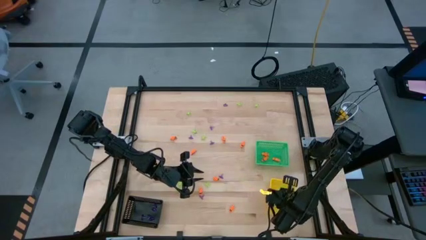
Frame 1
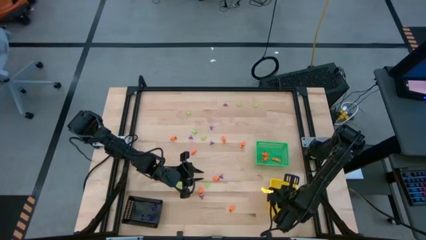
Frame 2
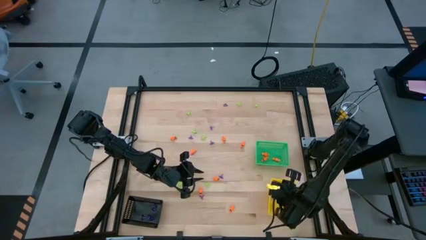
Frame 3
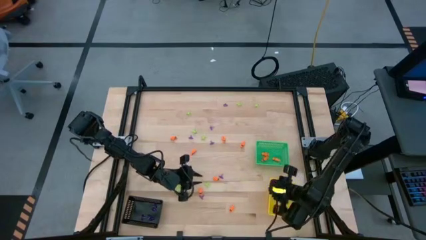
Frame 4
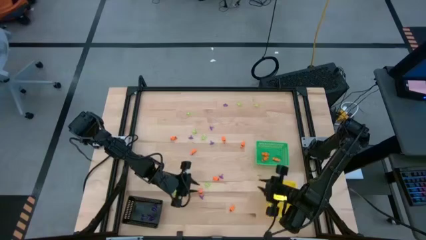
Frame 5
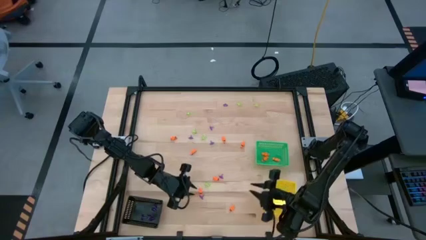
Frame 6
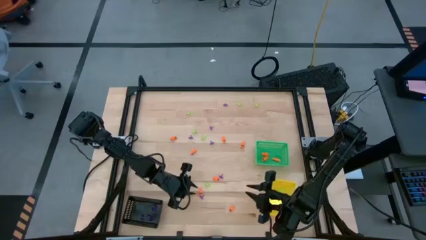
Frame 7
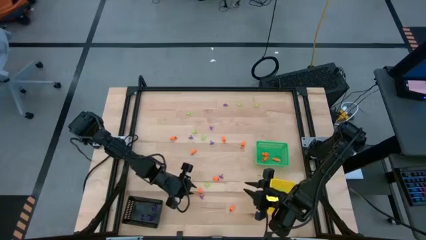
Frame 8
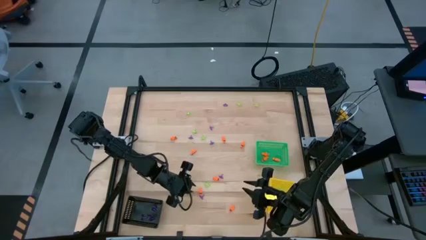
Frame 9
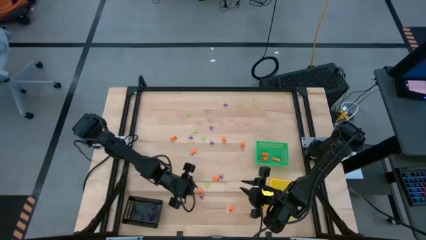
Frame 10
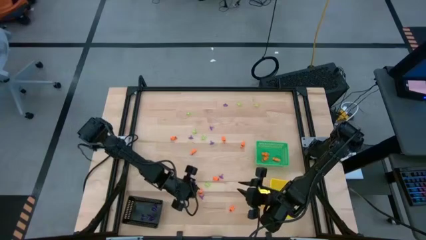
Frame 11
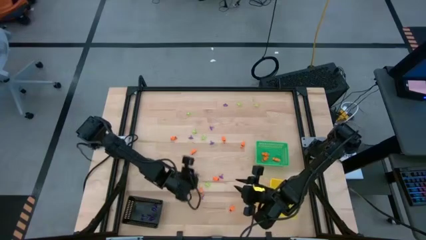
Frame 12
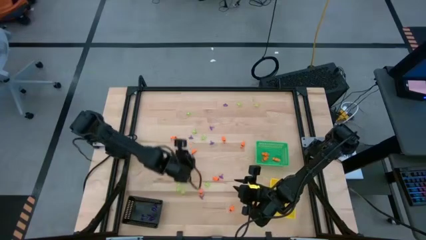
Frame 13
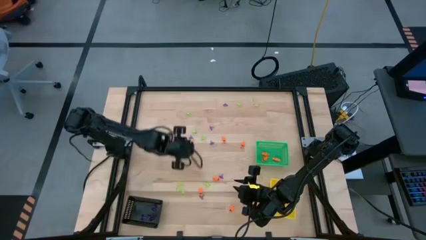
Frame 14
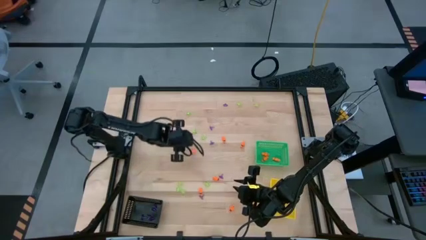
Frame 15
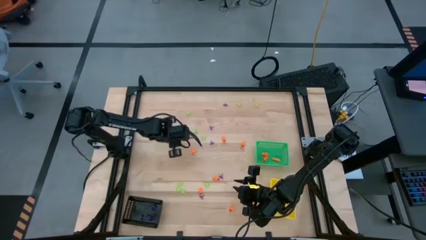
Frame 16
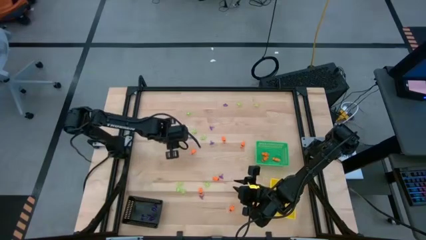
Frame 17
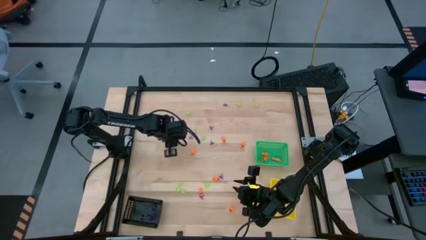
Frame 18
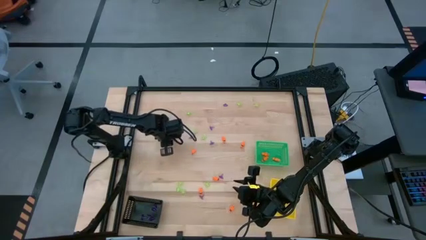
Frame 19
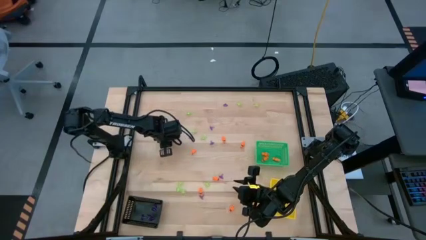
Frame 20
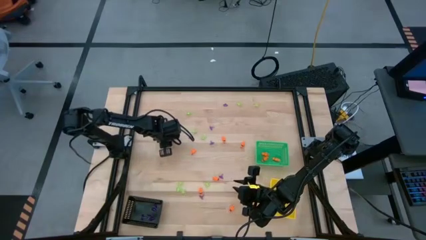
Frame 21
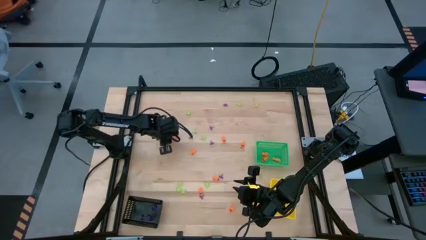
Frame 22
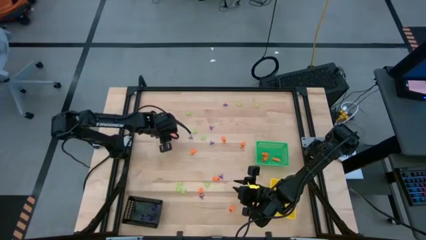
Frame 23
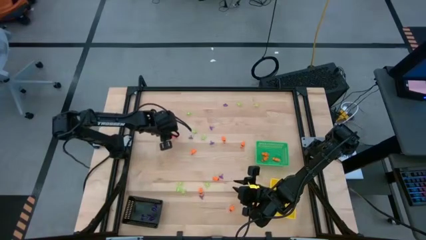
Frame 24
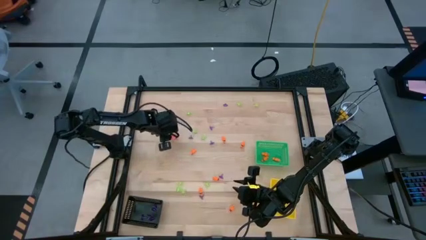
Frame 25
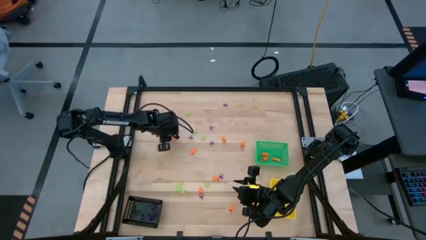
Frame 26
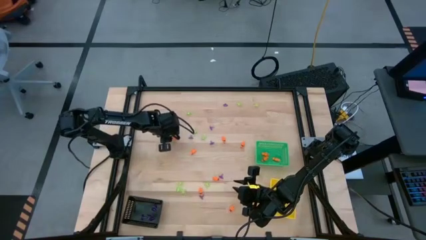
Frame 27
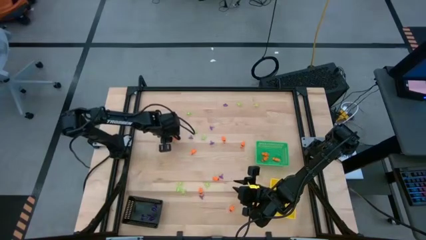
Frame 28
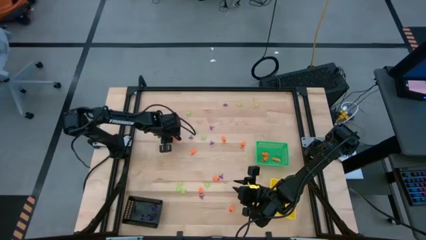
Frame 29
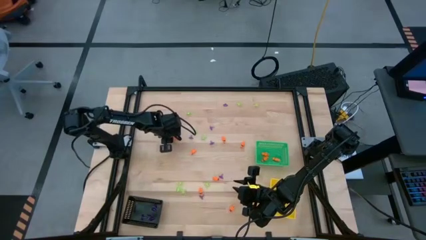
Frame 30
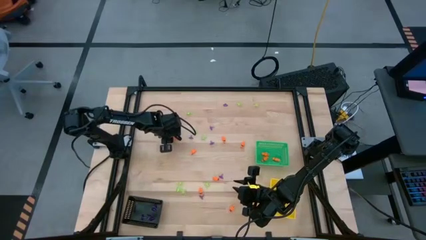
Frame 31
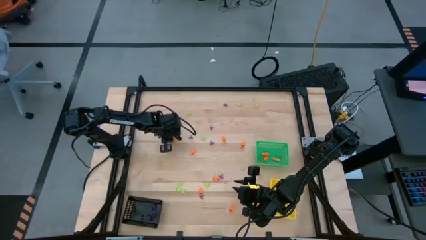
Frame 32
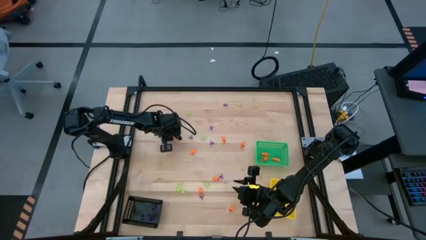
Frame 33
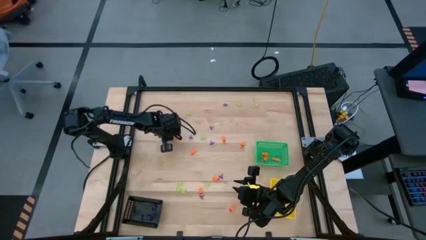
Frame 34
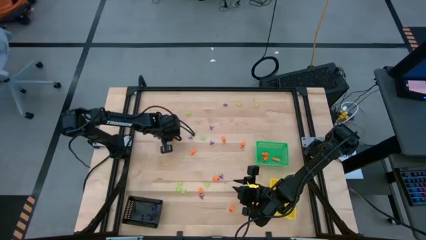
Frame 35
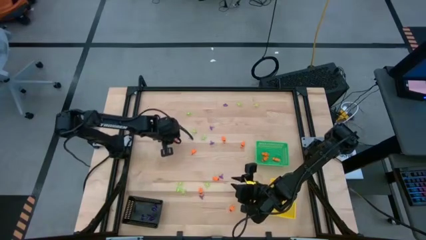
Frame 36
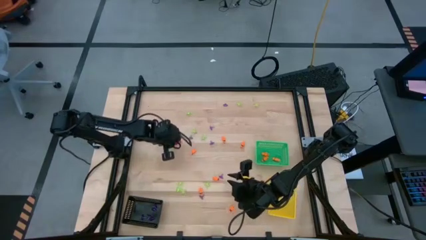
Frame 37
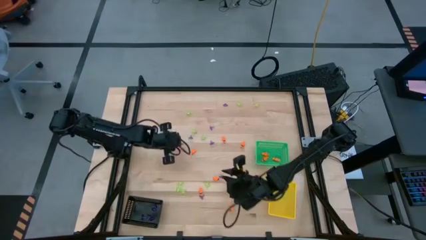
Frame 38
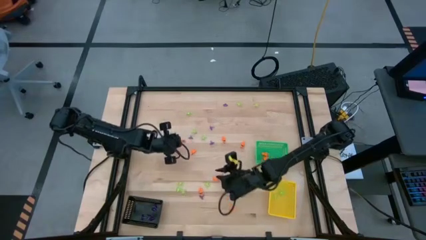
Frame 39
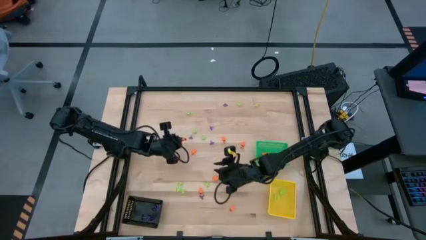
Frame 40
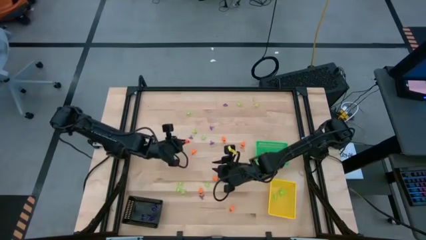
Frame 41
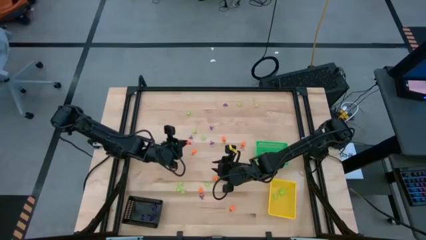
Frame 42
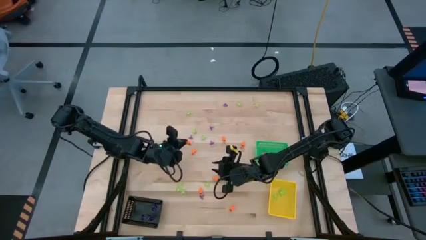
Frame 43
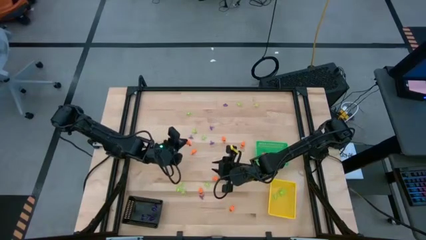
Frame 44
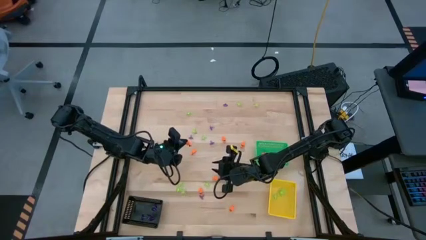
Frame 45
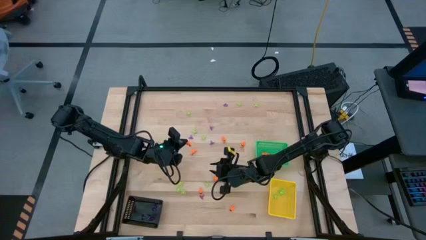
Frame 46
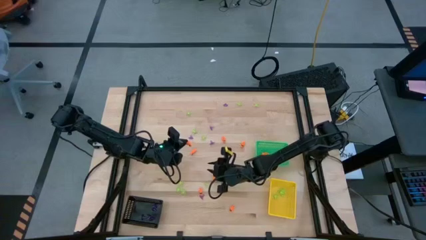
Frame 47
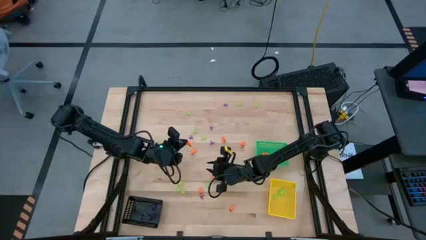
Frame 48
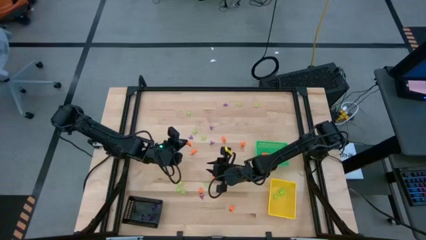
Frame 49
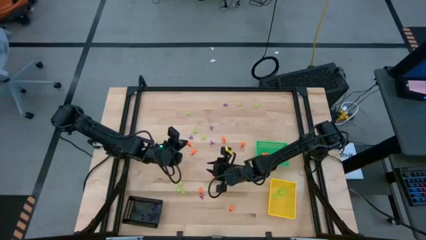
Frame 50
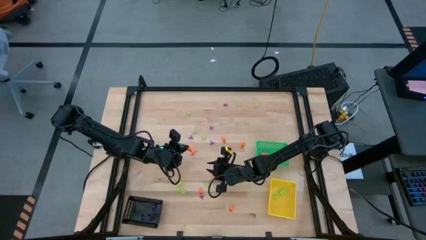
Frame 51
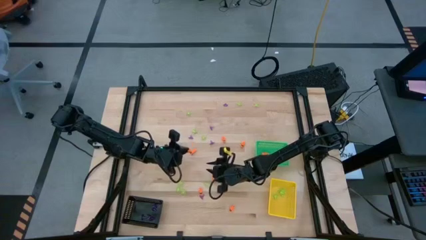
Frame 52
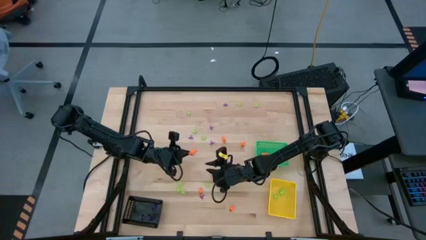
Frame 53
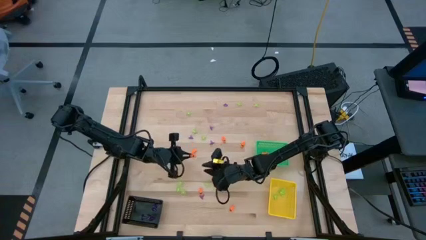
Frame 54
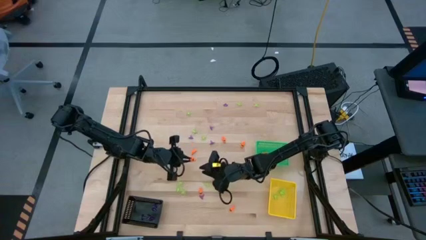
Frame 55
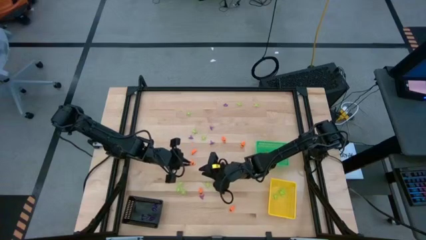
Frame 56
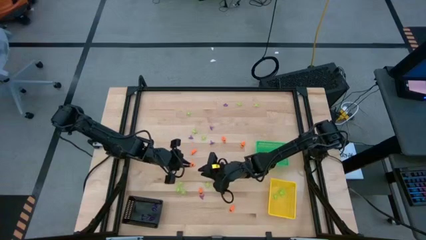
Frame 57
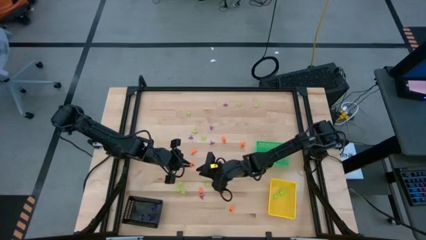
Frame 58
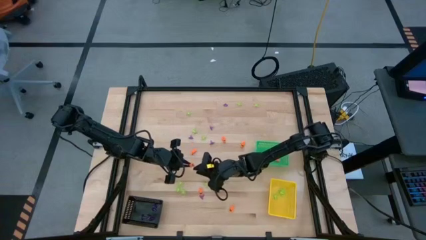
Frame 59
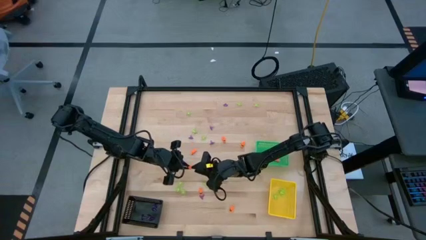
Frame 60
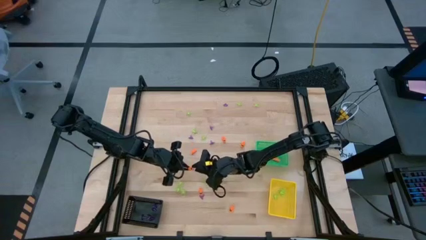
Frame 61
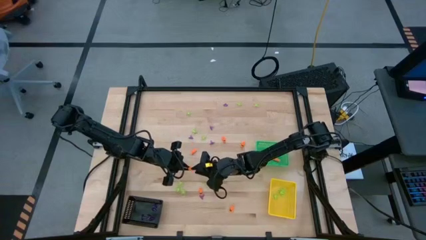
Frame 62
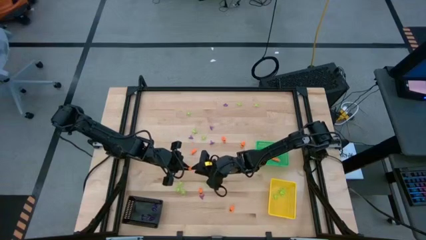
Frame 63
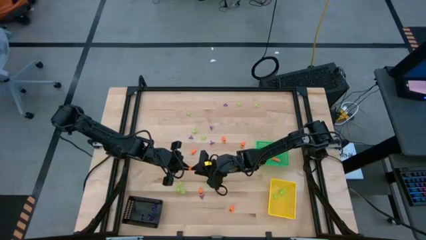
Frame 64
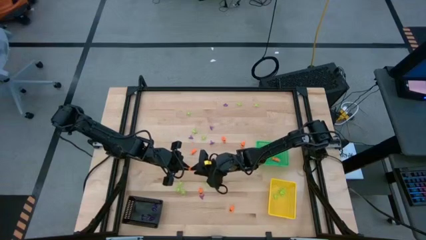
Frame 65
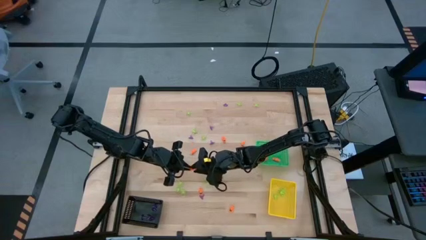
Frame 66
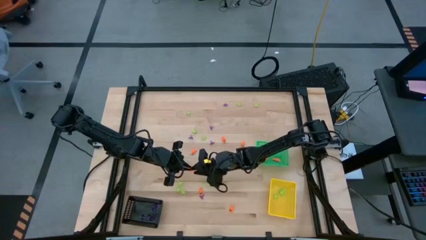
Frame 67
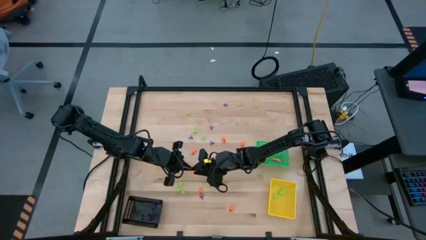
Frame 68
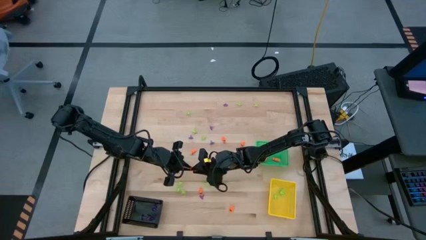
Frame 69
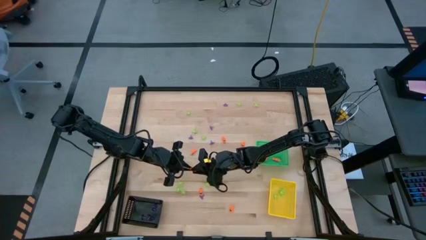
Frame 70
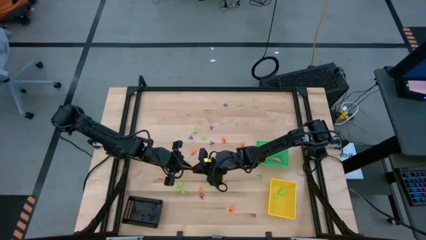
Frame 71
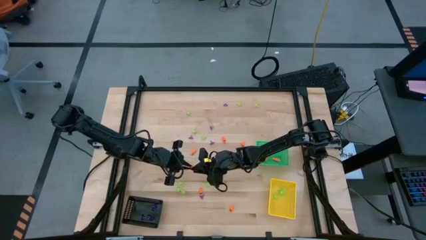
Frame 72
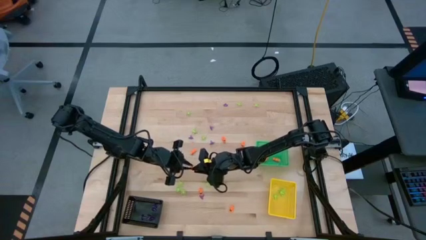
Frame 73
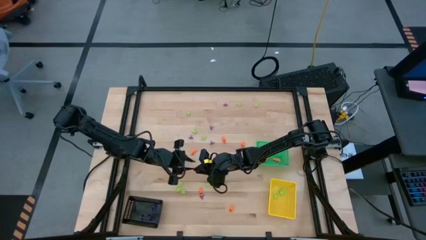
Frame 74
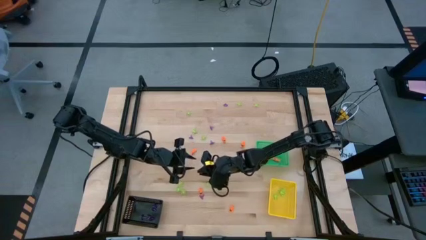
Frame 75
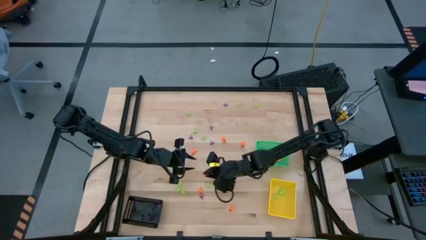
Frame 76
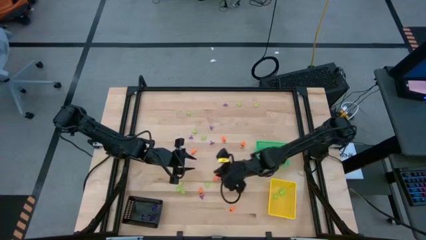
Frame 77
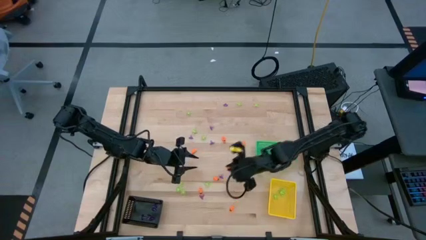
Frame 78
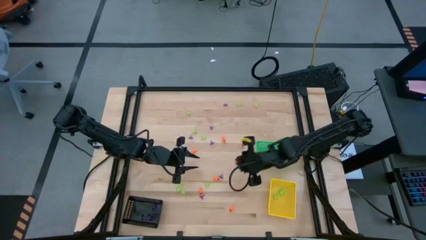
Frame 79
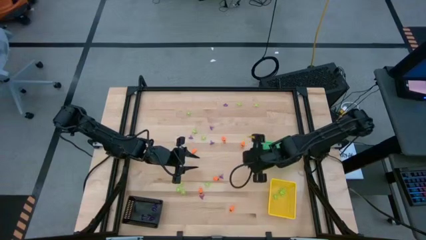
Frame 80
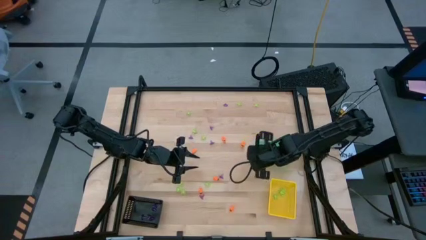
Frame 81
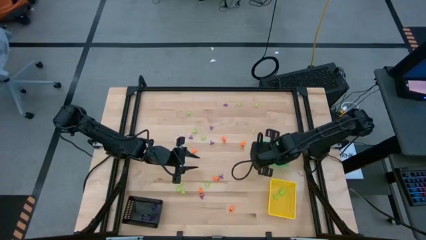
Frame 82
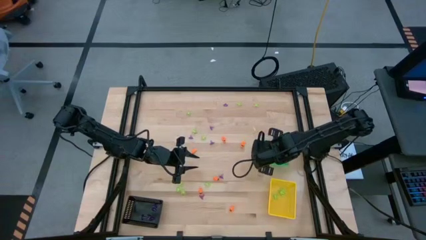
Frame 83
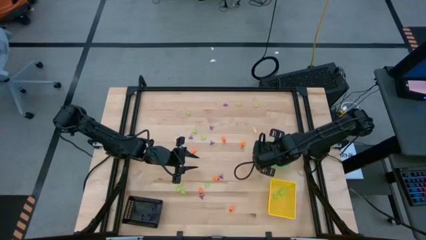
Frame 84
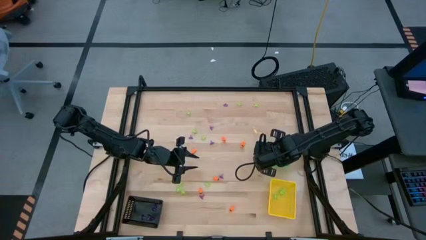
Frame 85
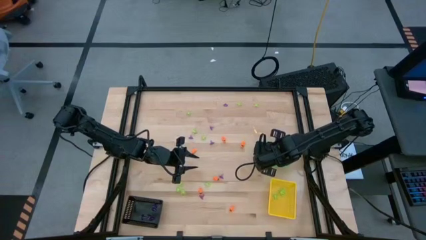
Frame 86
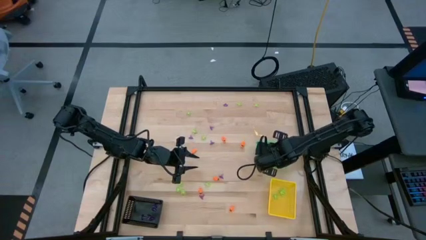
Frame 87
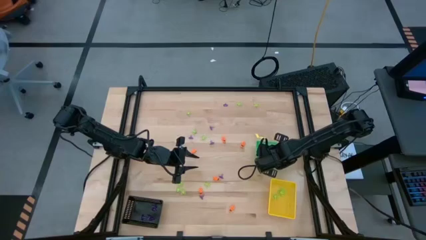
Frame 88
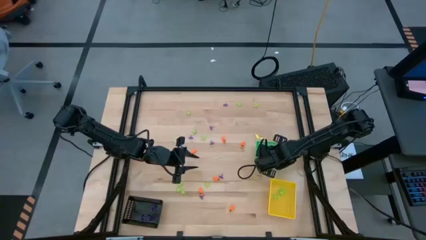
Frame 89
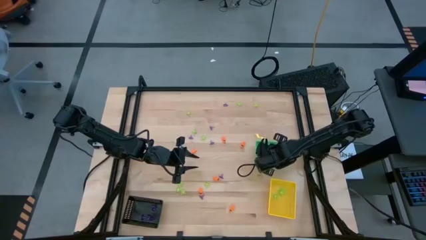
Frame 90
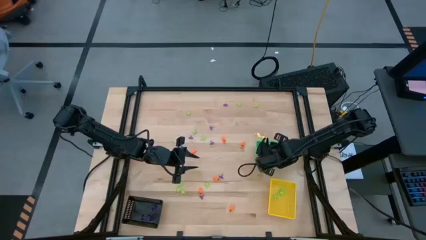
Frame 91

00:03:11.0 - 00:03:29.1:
Task: Sort Halloween decoration
Put the orange skeleton toy into the green bin
